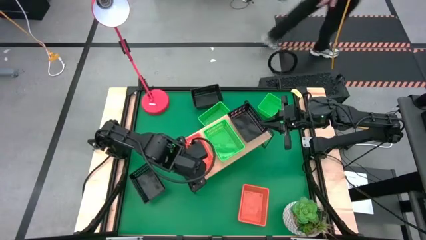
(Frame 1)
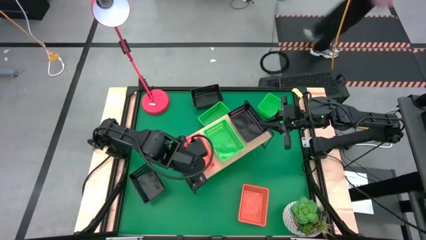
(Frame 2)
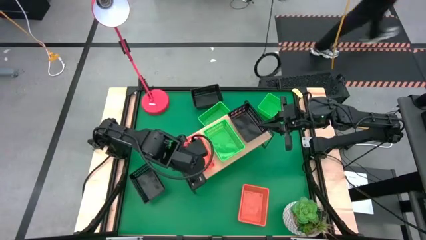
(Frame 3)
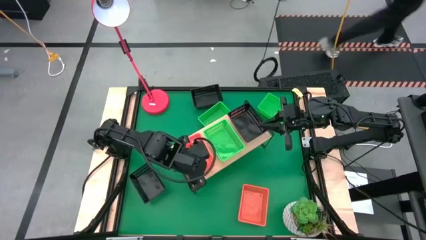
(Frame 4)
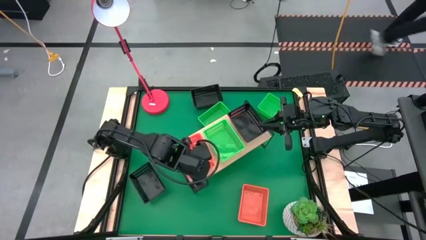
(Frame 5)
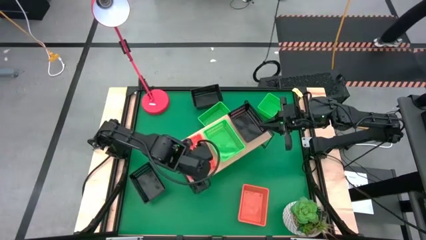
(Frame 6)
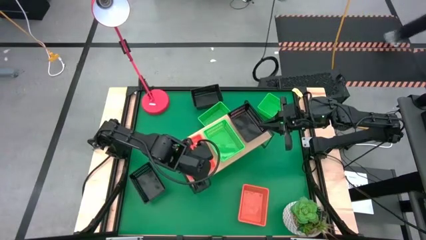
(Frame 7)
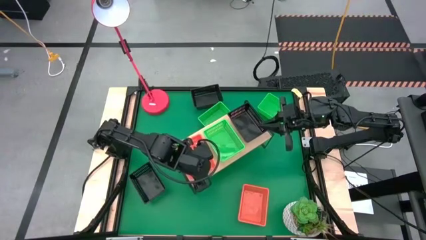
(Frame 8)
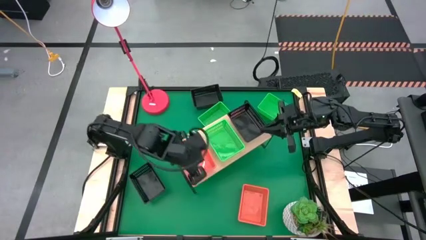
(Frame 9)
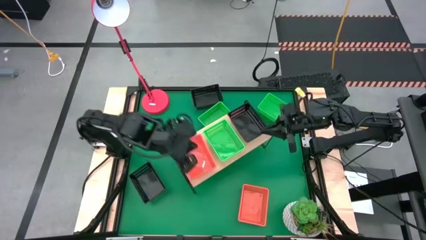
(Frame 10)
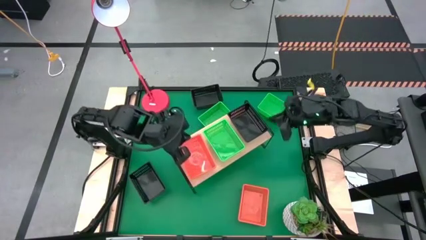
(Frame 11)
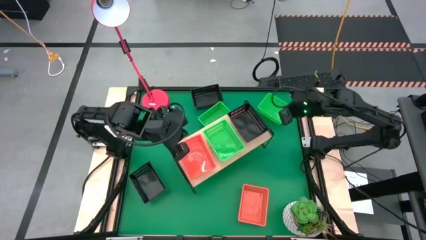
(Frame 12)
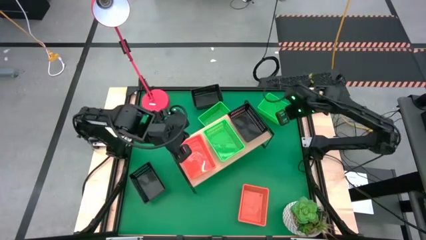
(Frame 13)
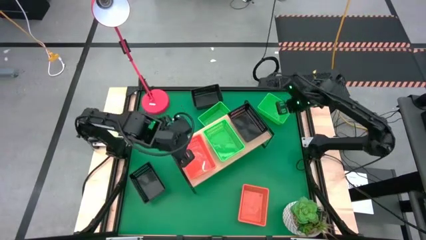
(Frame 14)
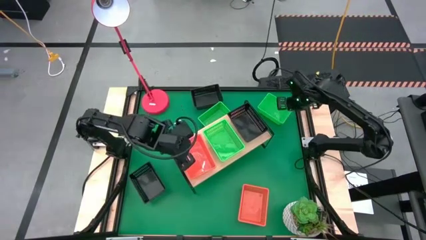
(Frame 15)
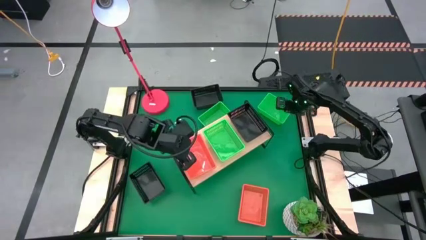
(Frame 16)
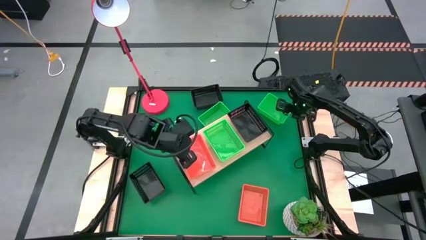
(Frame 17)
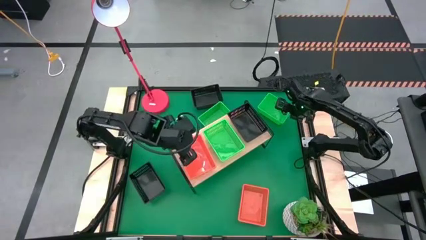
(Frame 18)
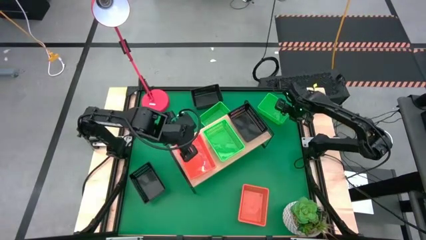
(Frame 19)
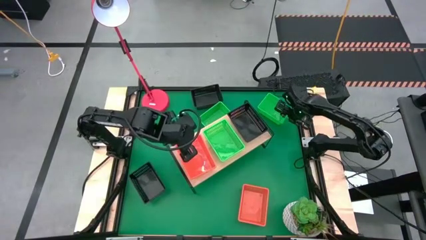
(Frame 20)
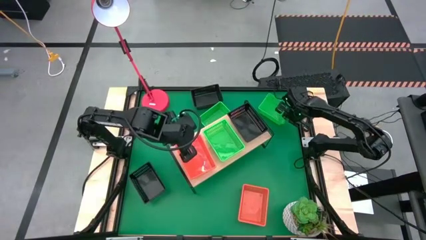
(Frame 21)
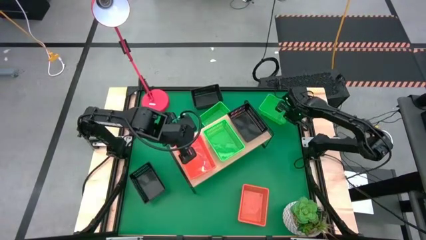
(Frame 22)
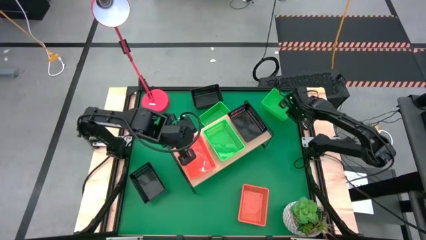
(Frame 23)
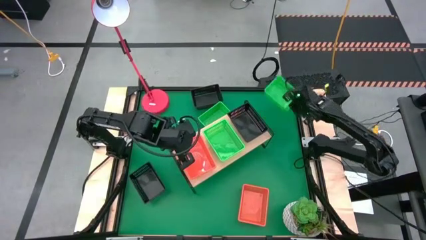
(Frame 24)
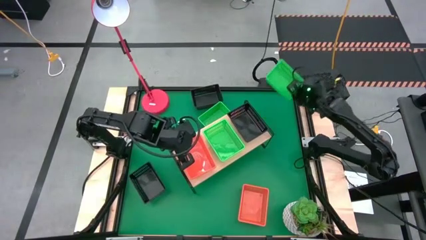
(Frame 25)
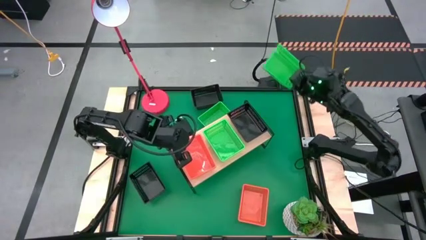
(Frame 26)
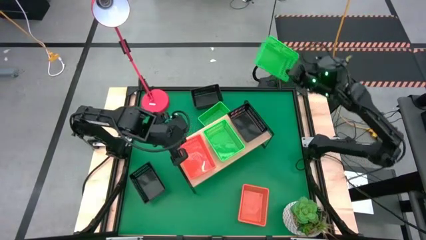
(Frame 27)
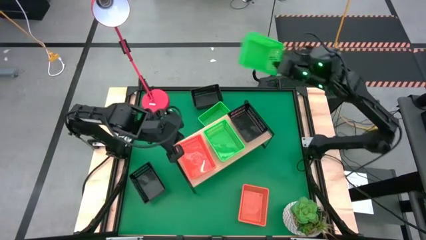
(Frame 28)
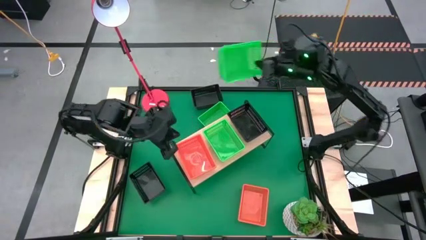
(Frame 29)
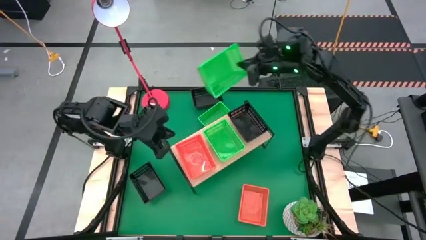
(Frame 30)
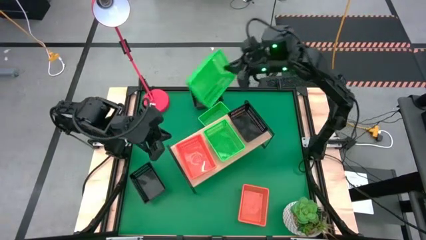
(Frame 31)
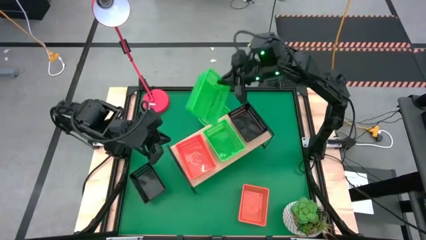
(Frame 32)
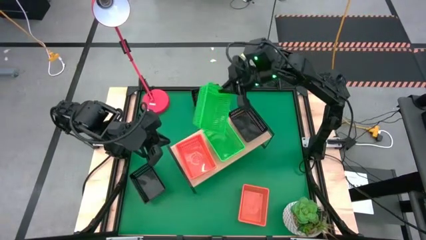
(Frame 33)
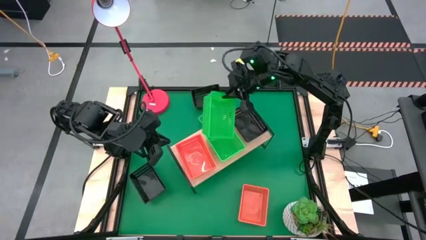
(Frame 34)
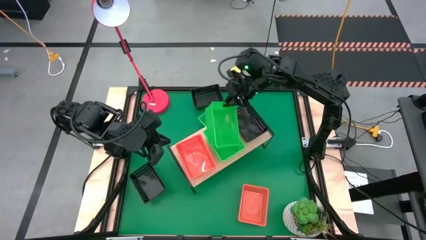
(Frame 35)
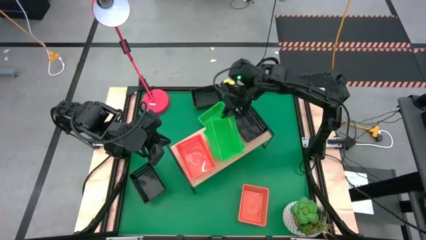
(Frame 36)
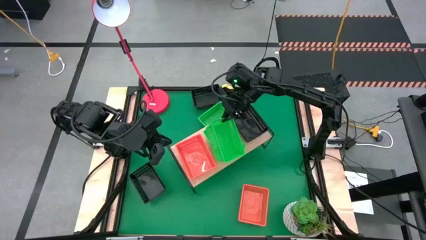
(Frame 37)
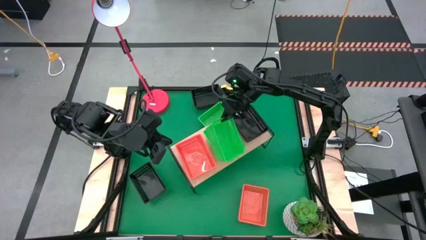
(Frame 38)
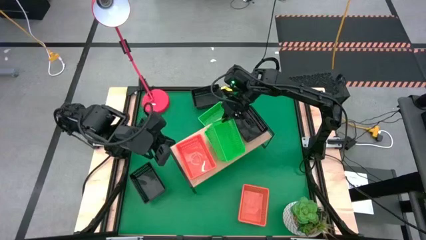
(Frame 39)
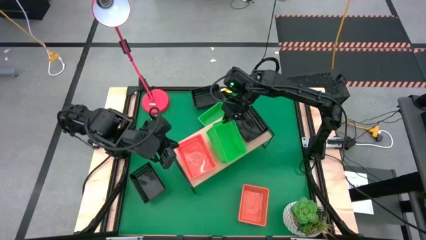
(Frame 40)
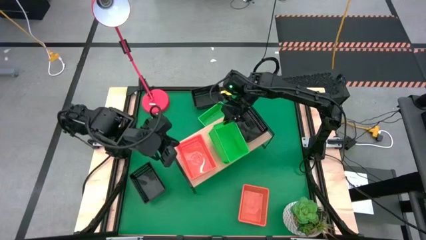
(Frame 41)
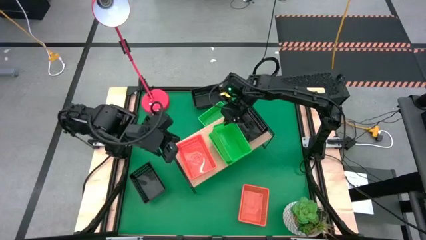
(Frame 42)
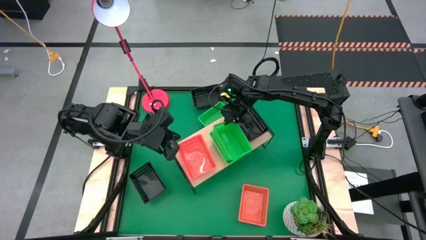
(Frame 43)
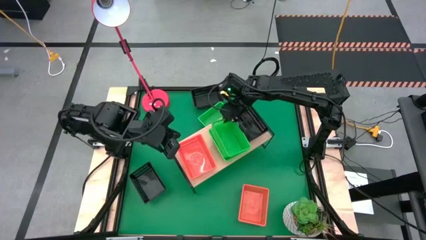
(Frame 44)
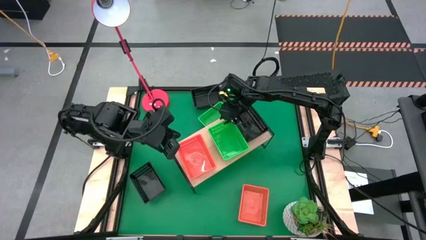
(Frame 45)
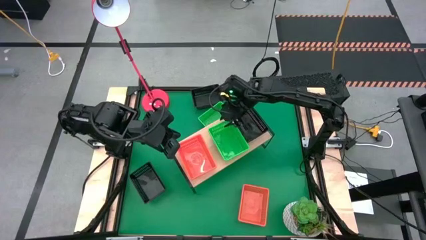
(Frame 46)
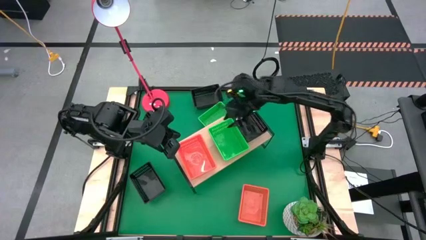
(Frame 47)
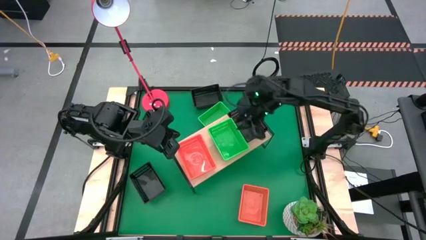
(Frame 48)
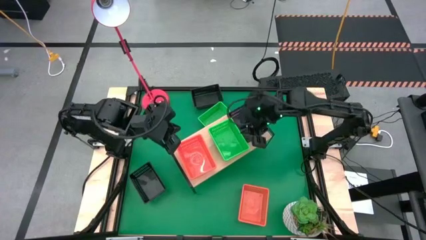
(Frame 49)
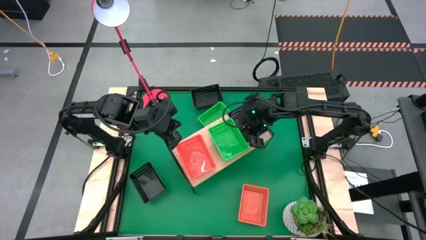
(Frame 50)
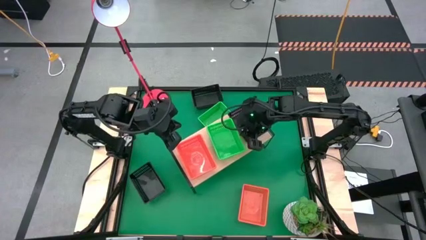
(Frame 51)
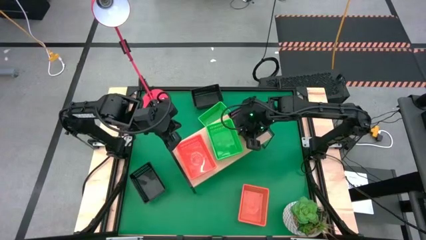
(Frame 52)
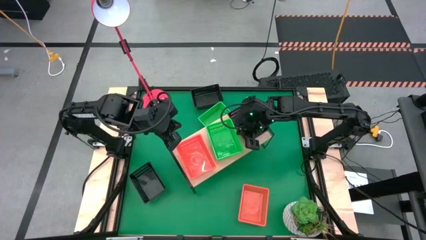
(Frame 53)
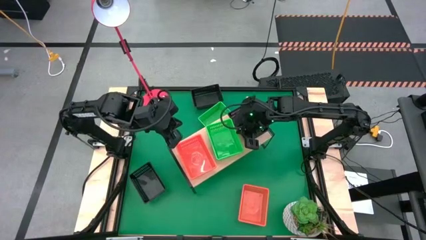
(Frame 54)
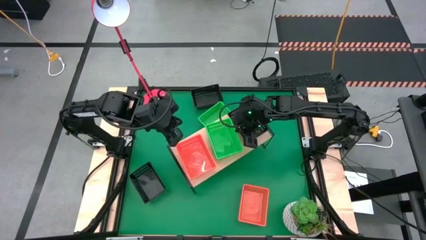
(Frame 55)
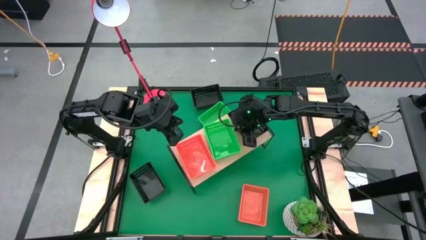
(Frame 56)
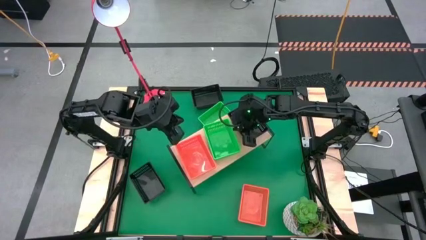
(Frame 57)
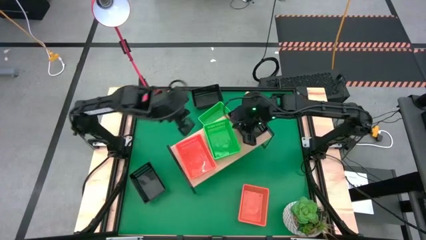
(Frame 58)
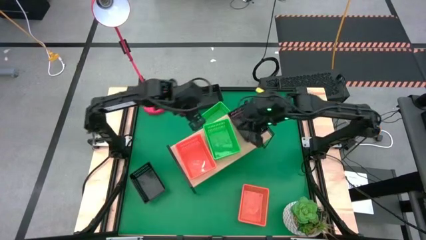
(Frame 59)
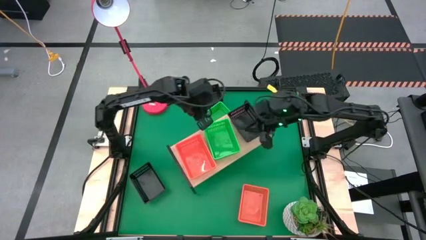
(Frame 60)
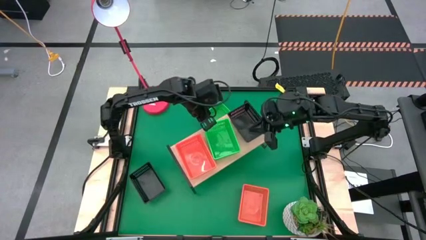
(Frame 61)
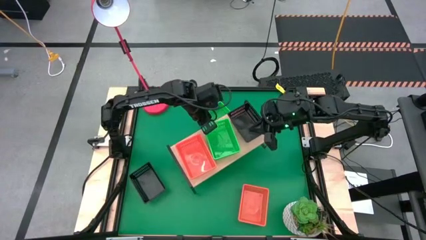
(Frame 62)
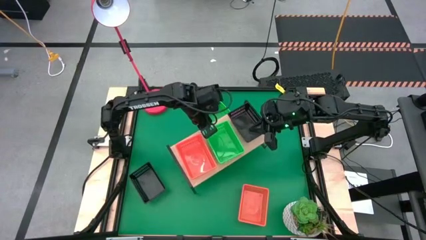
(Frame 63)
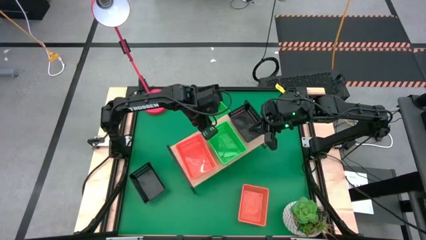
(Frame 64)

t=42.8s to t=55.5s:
Task: Stack baskets on shelf by color
Stack the right green bin on top of the green bin on the shelf

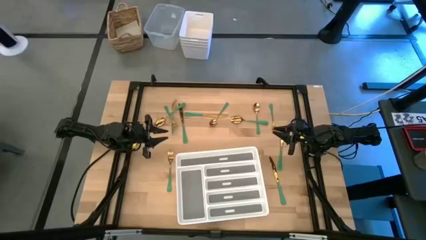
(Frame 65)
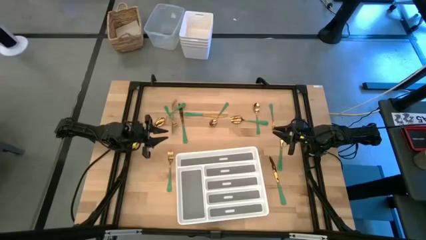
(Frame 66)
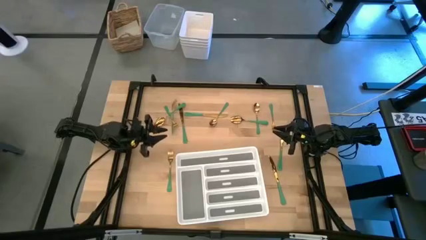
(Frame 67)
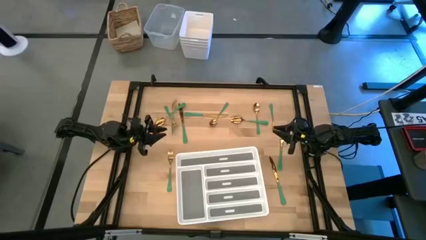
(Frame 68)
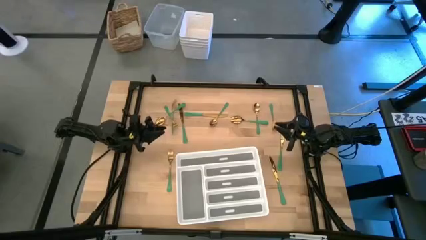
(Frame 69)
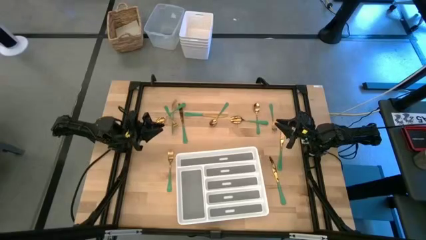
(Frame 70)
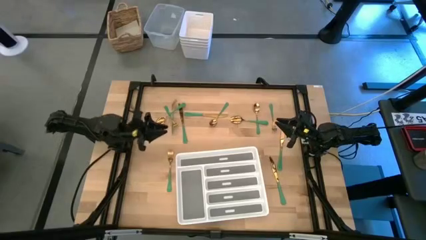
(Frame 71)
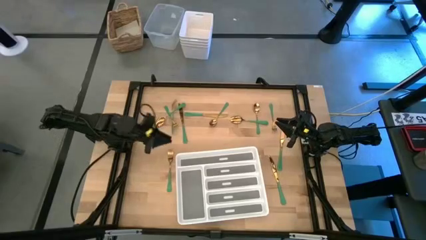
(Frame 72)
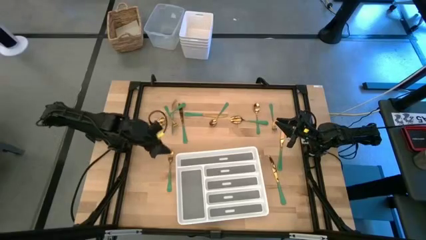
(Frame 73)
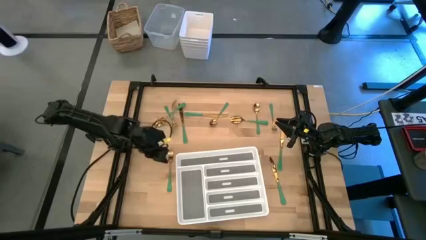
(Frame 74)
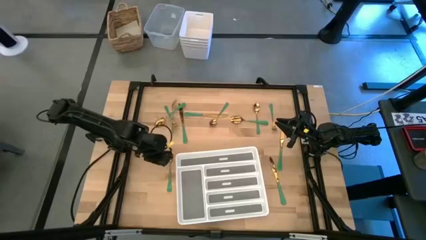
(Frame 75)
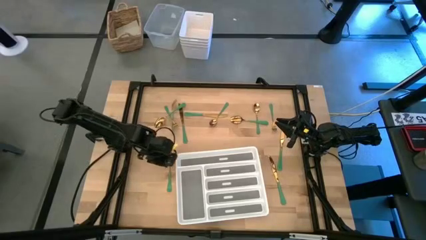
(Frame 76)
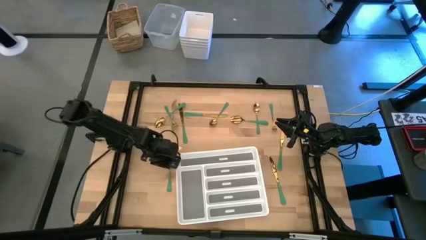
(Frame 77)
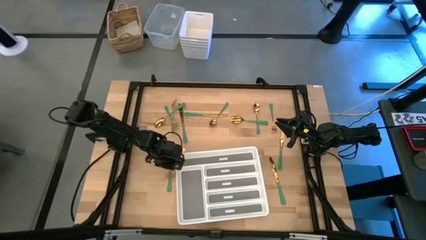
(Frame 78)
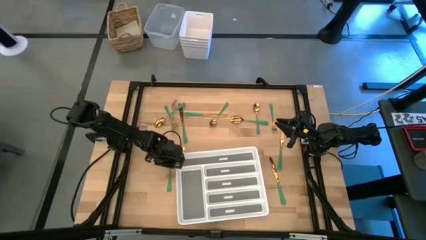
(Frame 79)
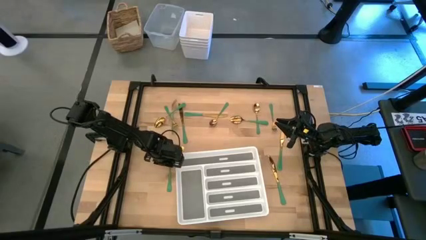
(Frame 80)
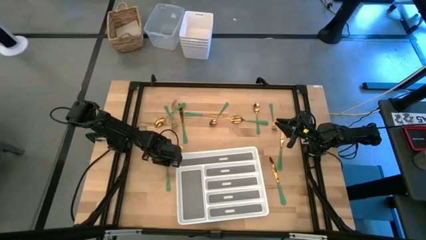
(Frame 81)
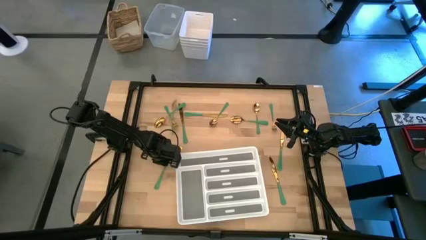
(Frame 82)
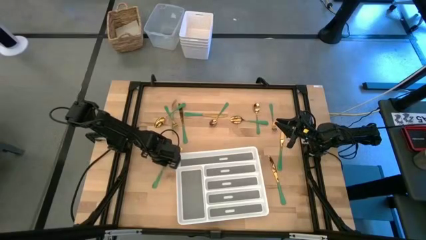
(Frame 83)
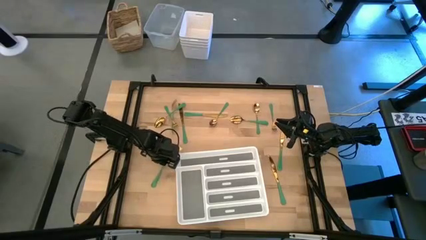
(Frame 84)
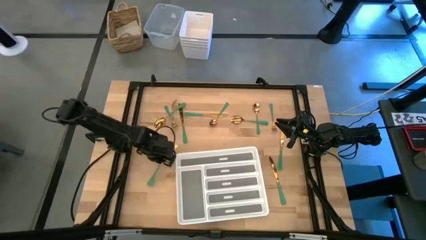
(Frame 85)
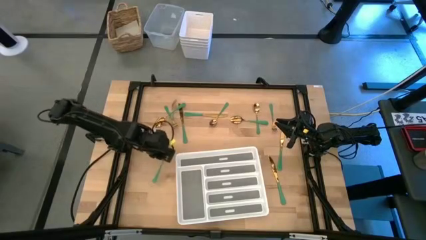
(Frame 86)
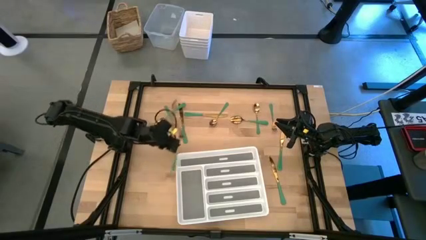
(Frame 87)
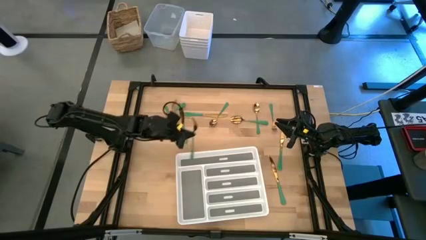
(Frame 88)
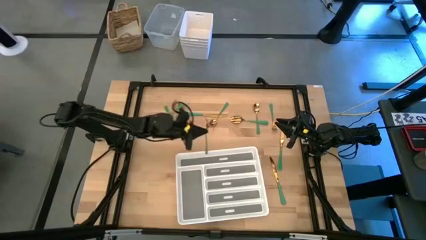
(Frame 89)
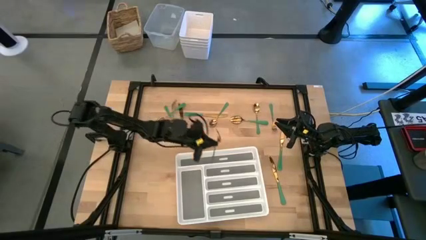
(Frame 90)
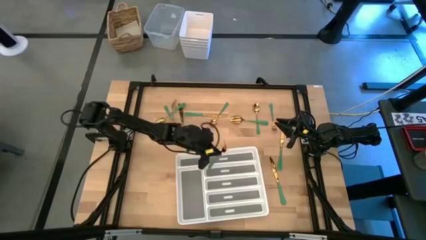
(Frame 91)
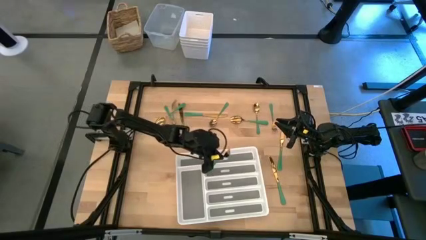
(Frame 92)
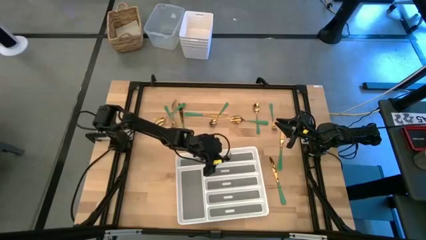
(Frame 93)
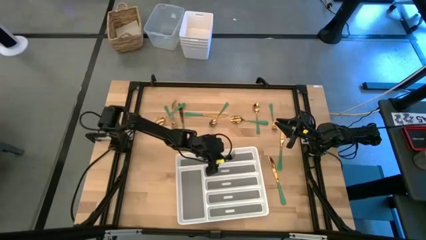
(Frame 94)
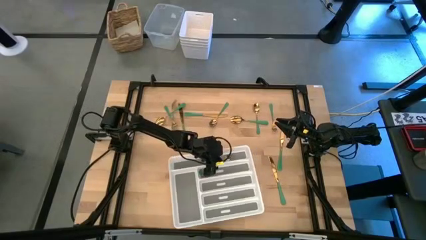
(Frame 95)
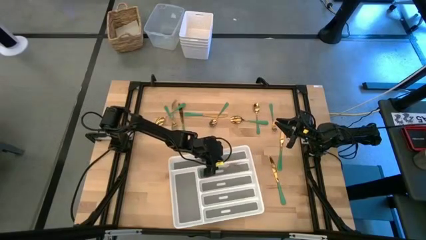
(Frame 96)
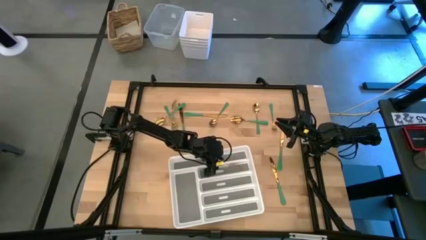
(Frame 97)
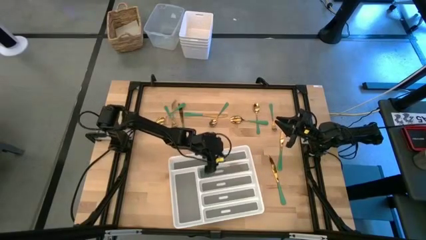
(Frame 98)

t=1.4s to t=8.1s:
Task: Sort silverware
Put the green fork into the white silverware tray
